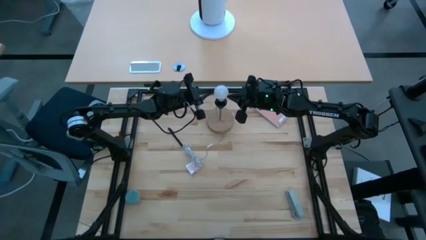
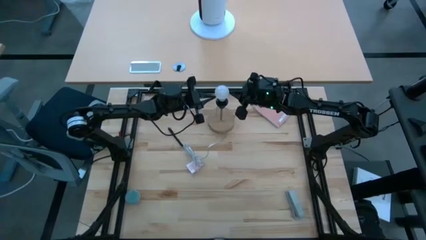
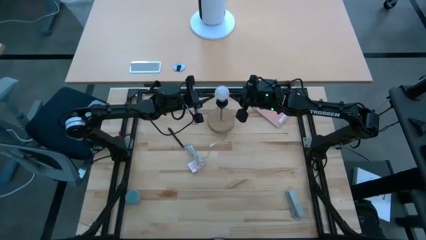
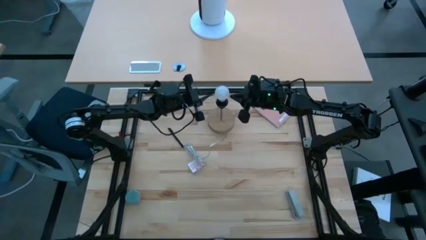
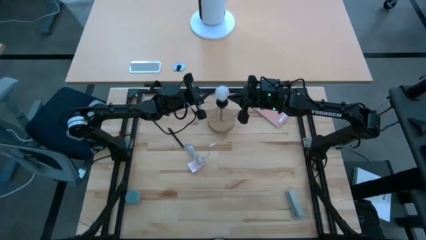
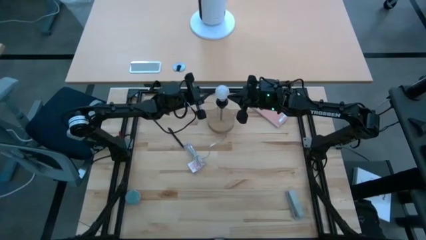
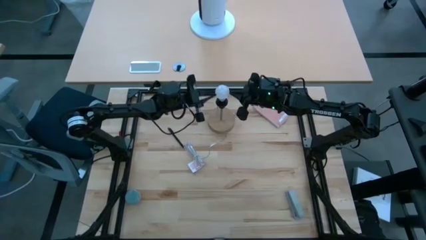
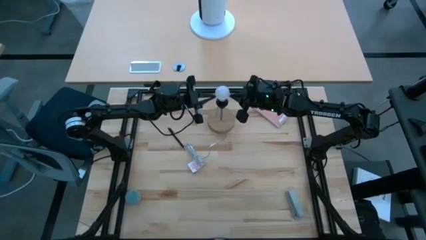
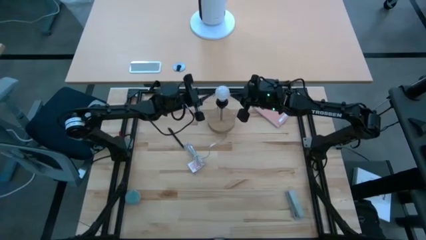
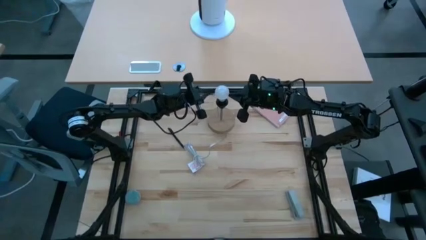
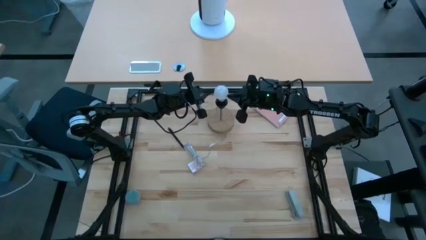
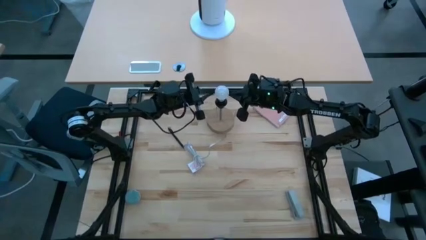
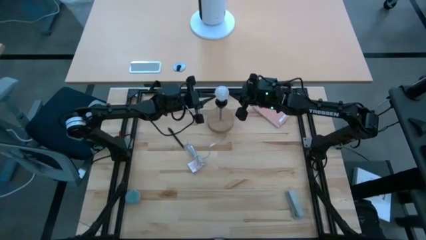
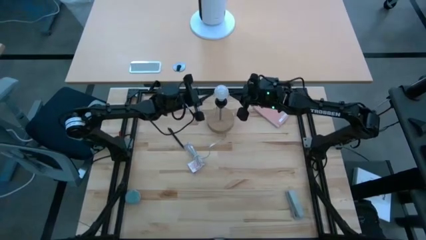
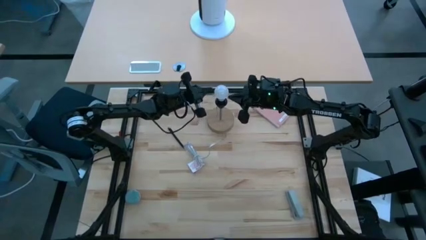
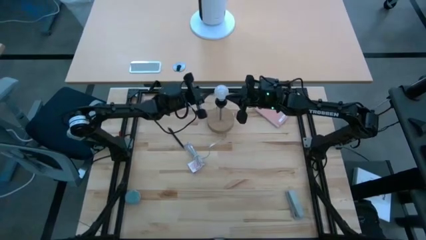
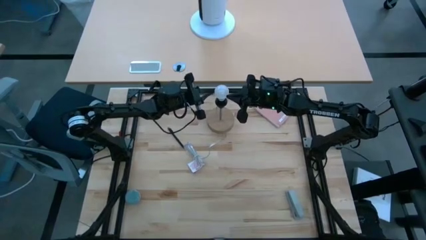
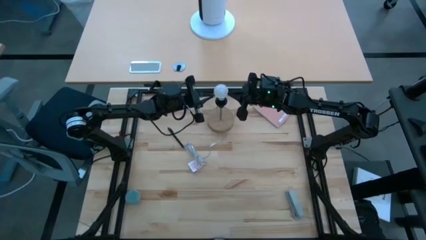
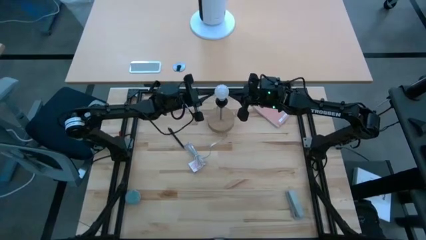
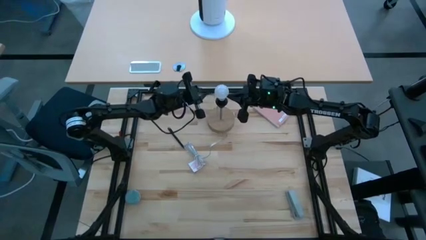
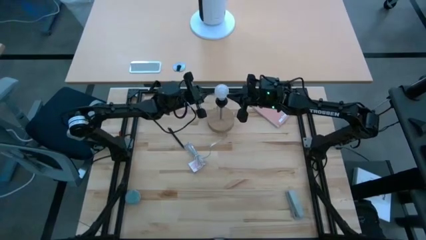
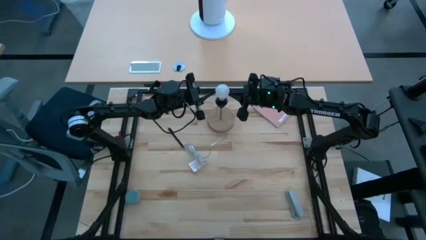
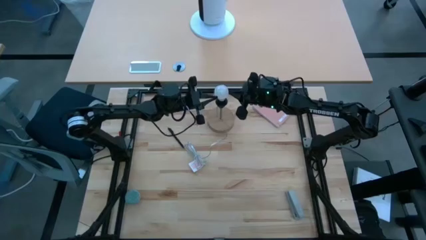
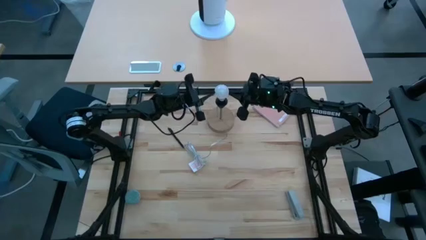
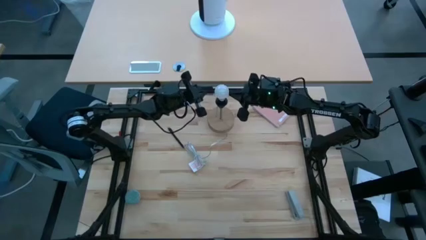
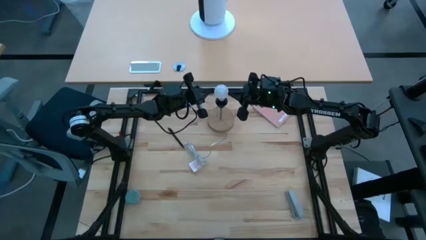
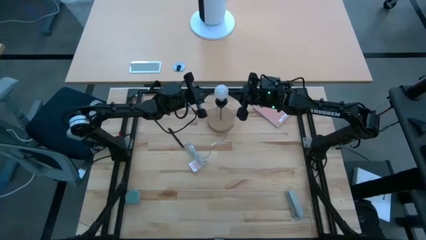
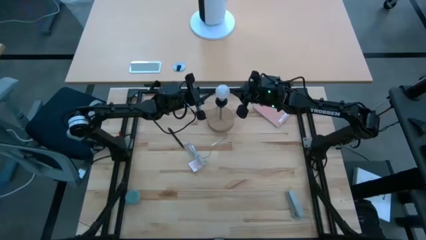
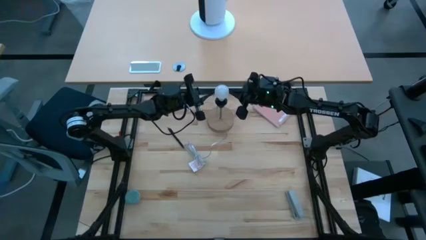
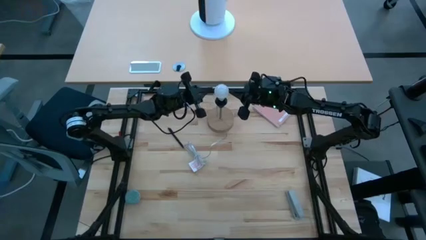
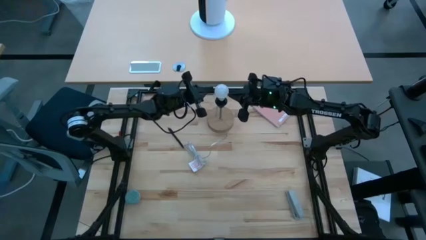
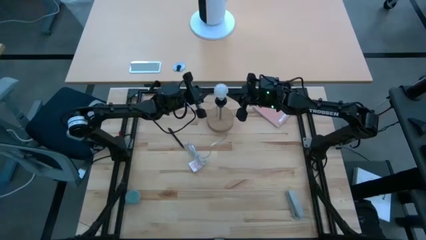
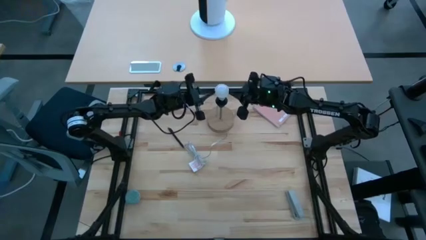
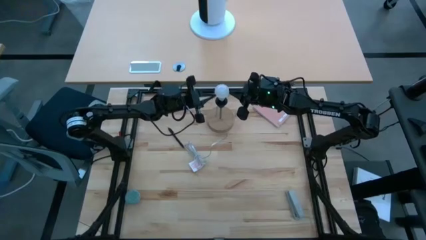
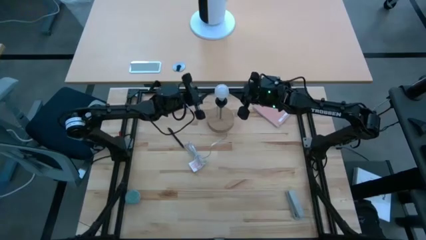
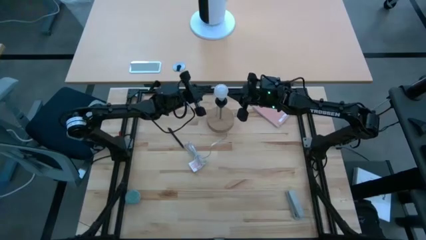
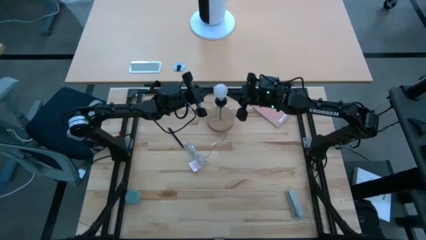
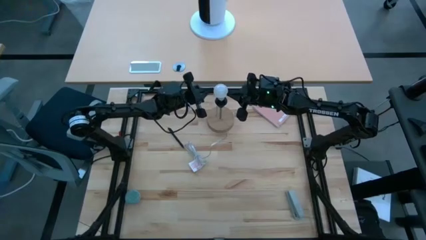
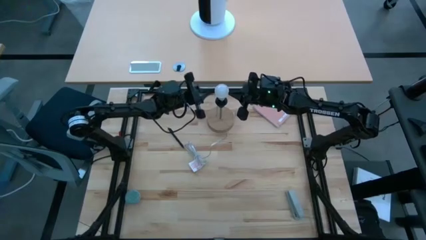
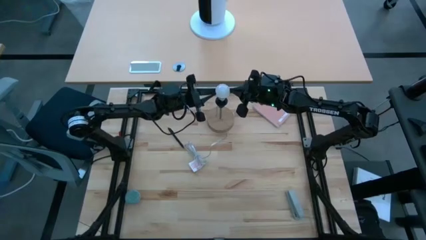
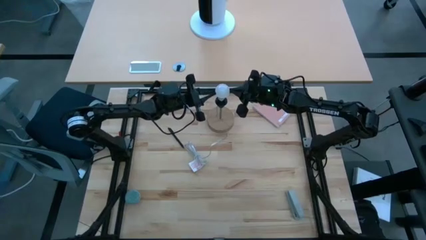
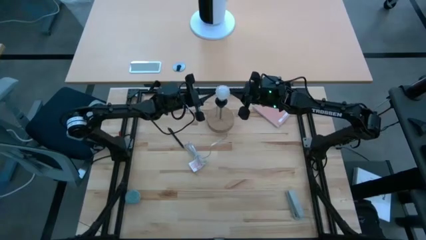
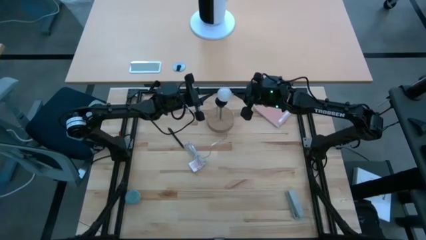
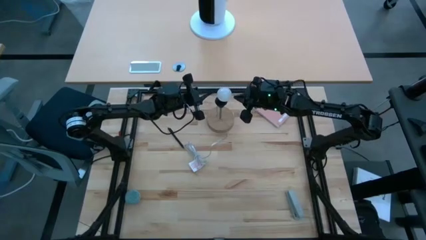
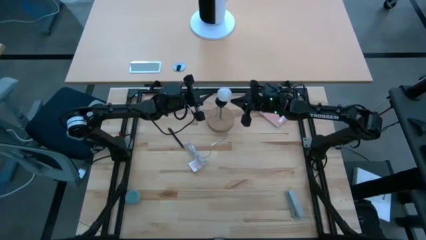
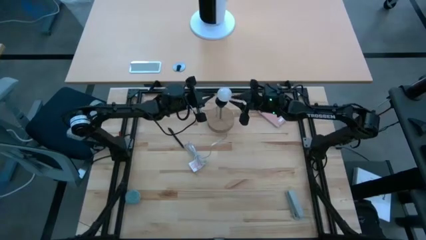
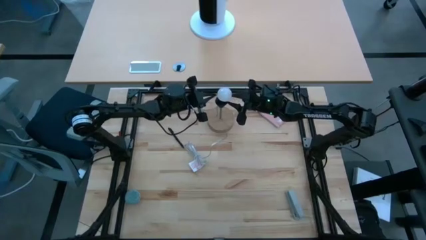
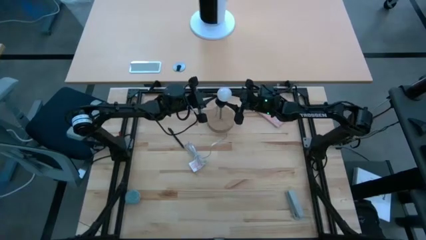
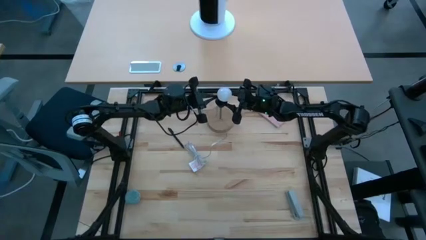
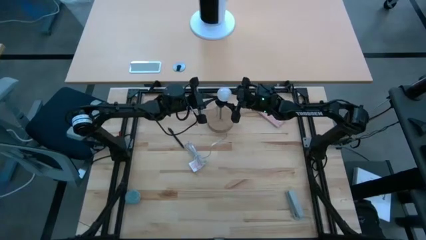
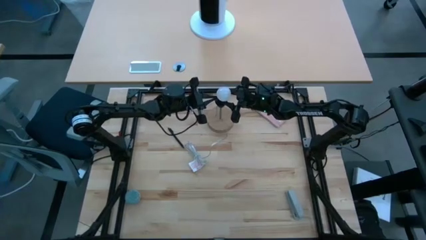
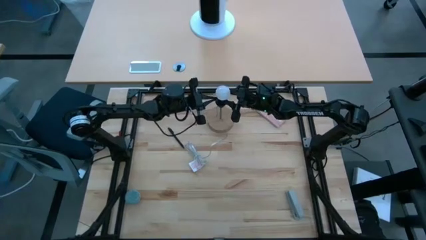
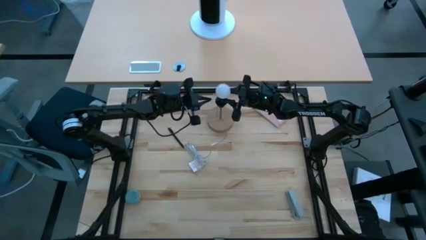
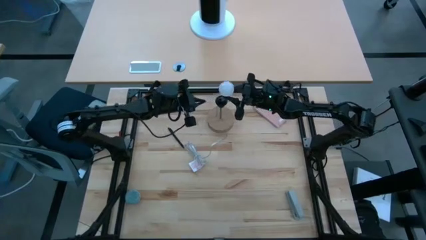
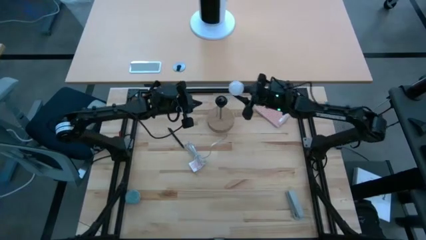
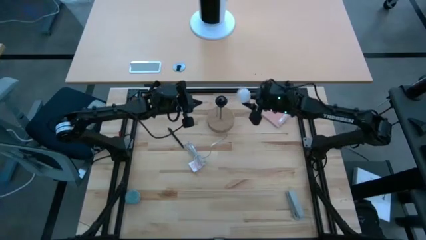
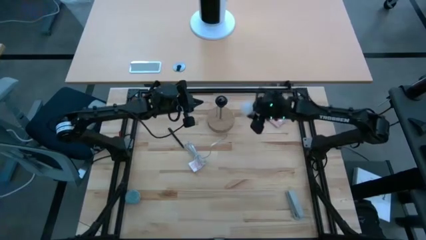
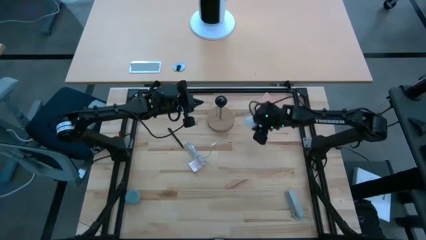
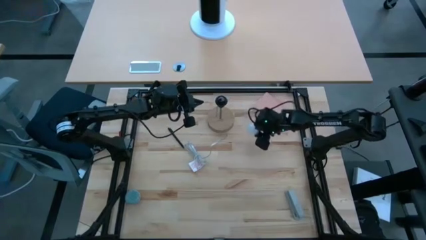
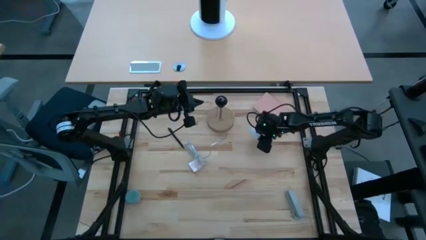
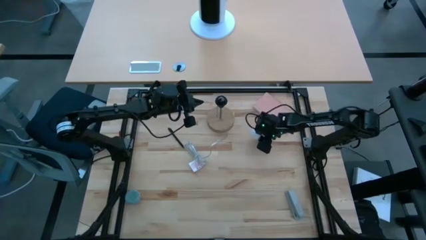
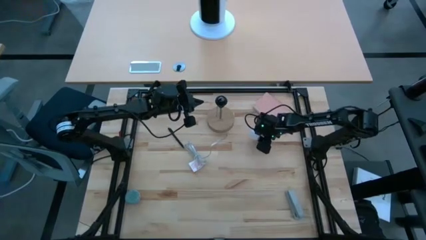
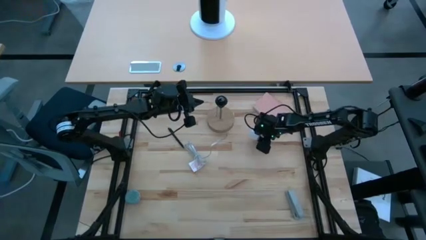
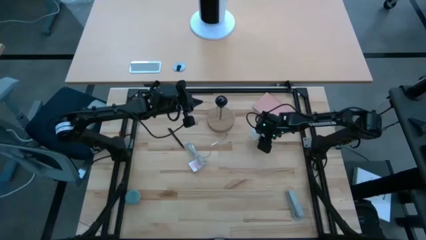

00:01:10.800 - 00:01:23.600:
Task: Screw lightbulb
Remove the lightbulb from the lamp

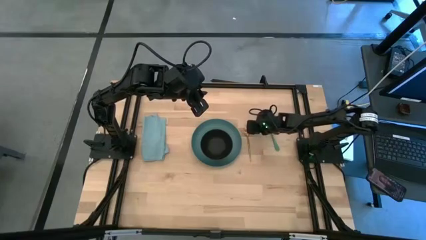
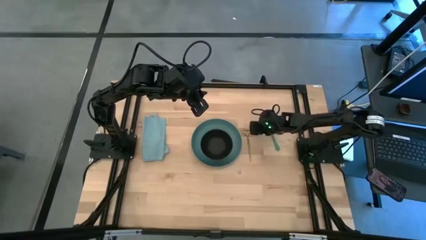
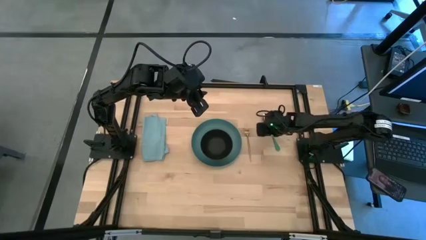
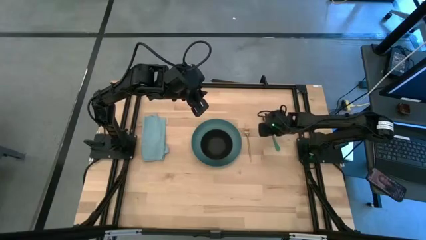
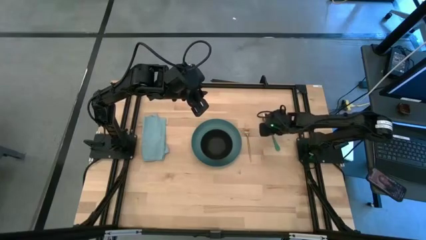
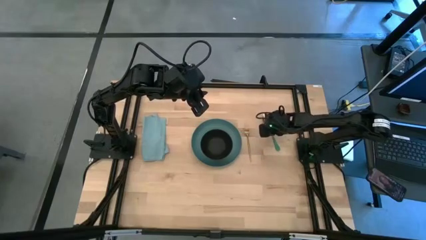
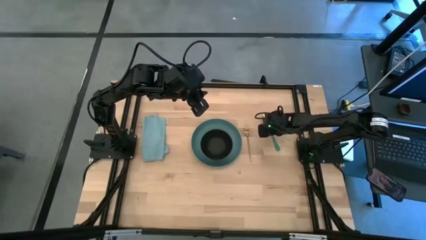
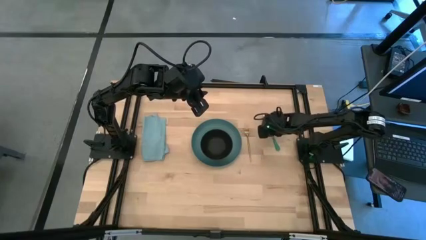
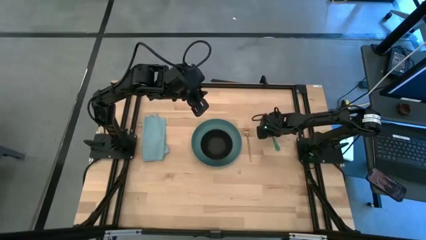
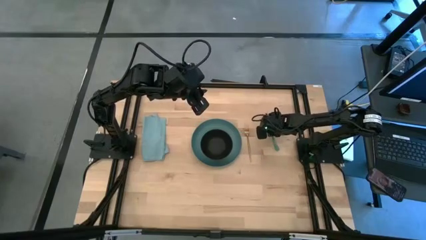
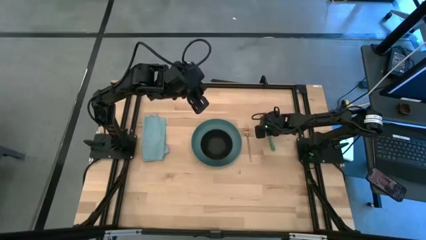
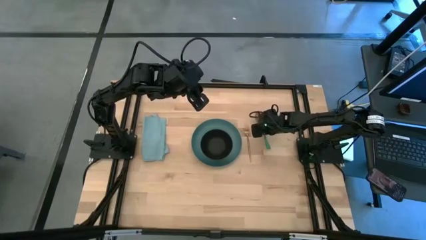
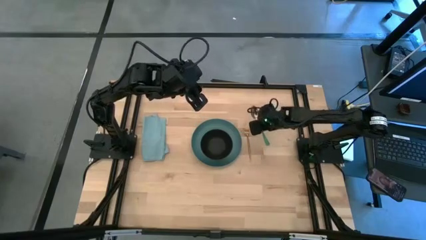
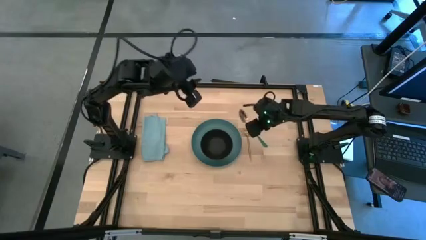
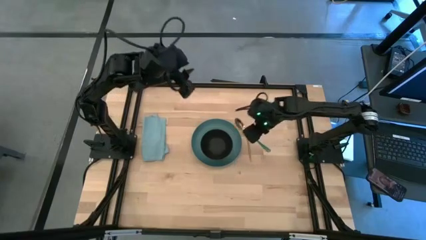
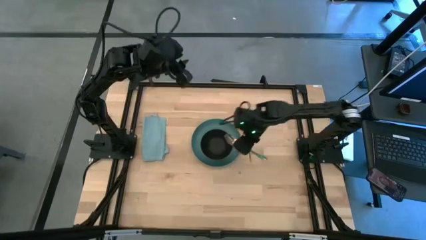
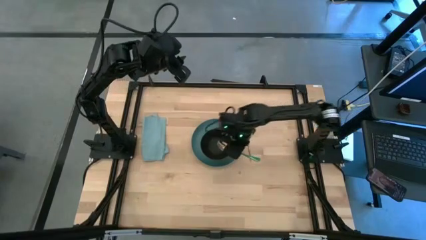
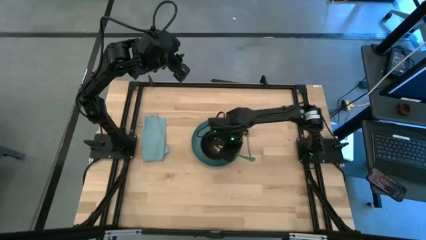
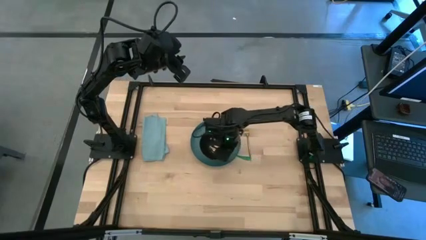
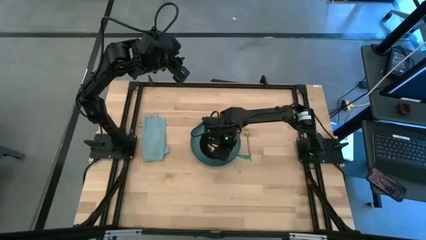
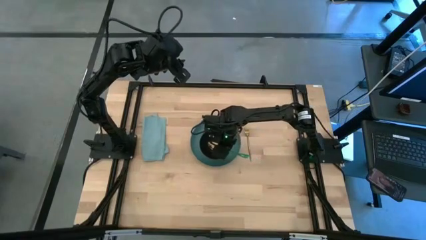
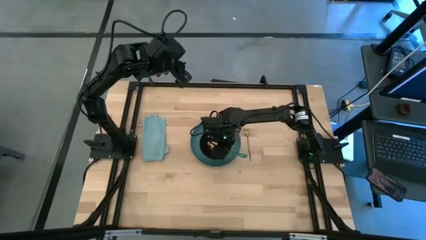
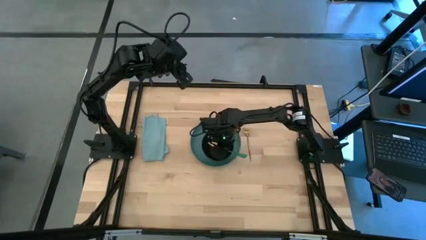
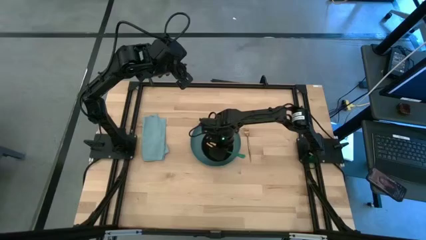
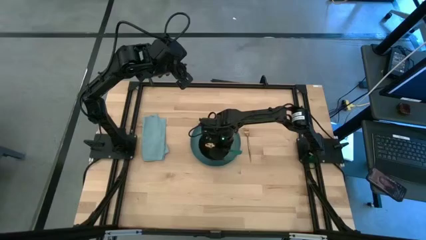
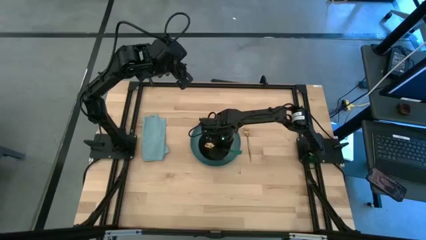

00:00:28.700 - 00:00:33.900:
Task: Set table place
Put the green spoon into the black bowl
